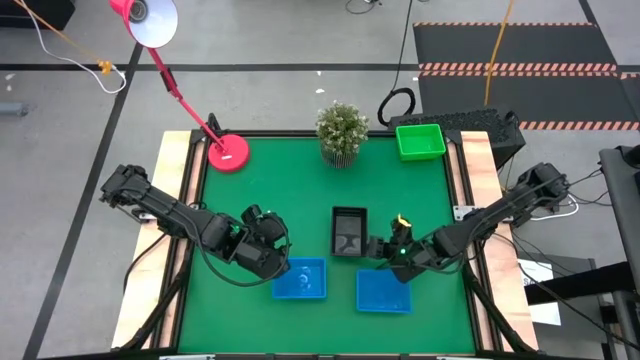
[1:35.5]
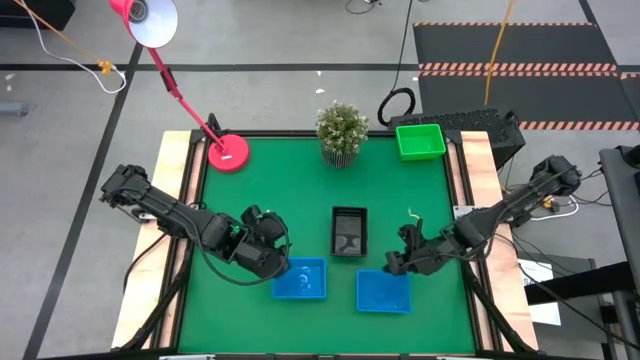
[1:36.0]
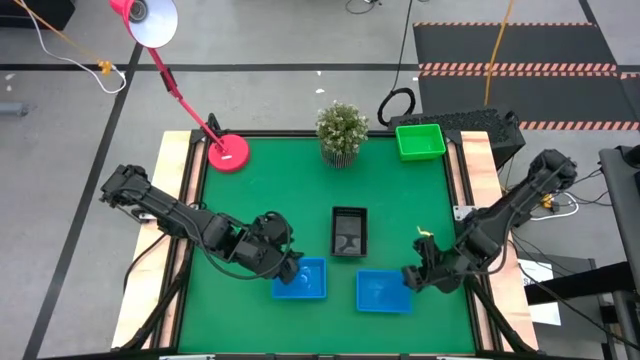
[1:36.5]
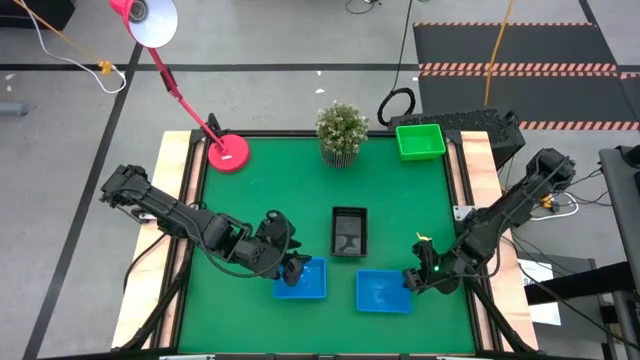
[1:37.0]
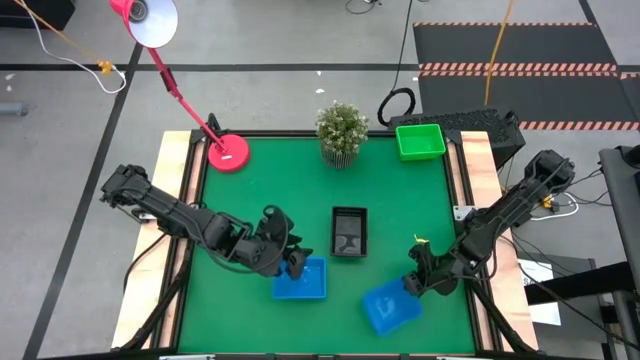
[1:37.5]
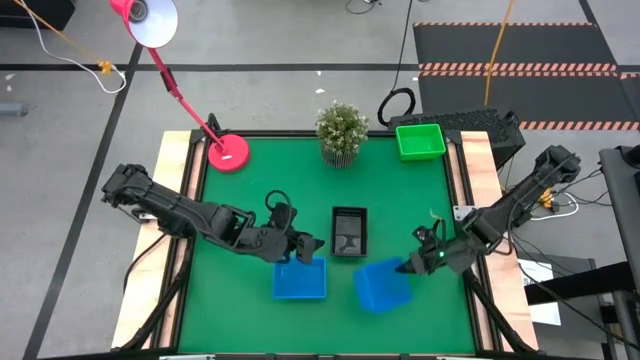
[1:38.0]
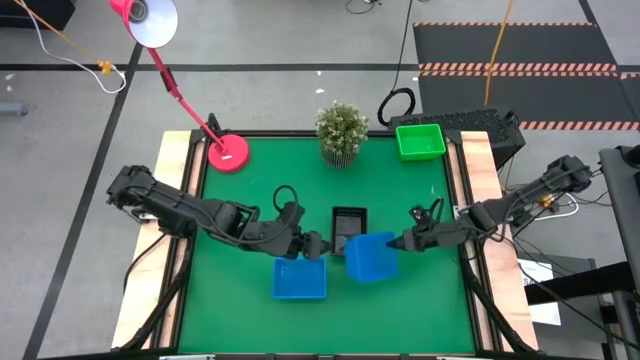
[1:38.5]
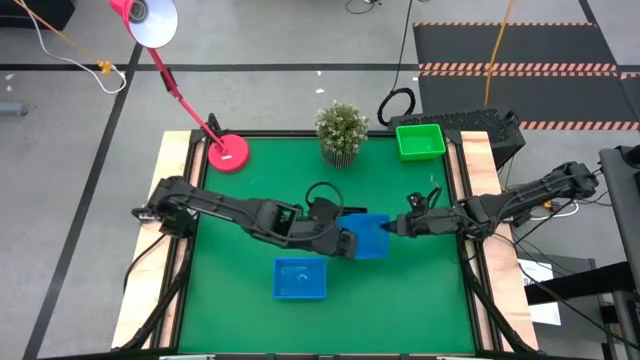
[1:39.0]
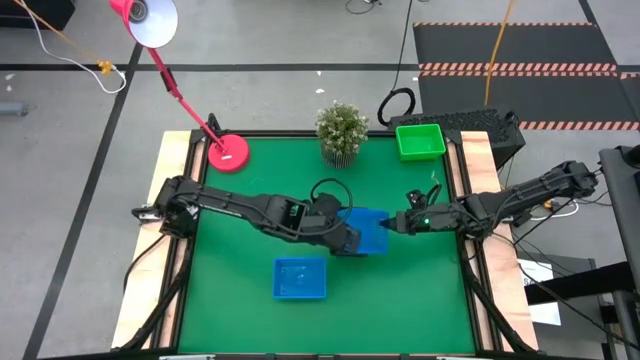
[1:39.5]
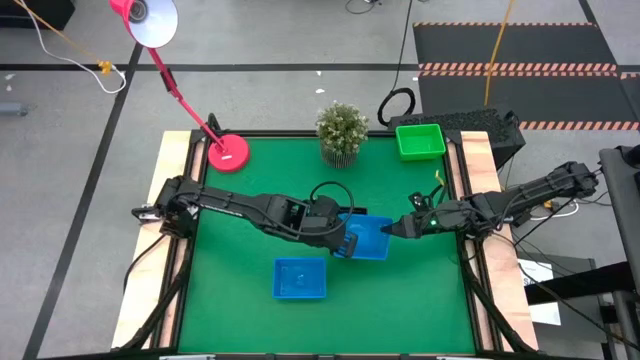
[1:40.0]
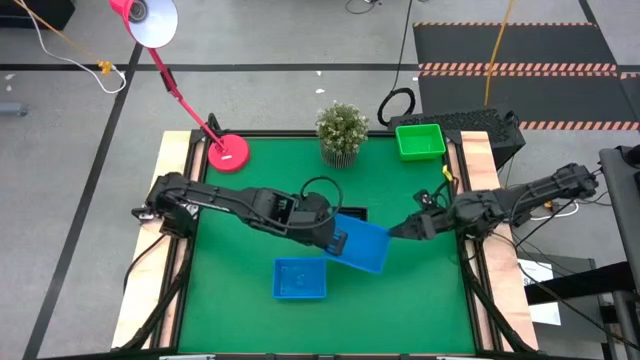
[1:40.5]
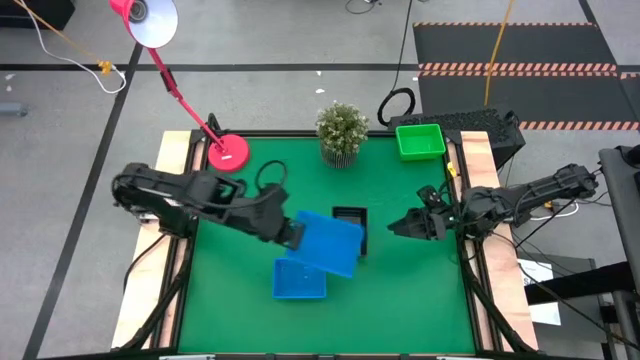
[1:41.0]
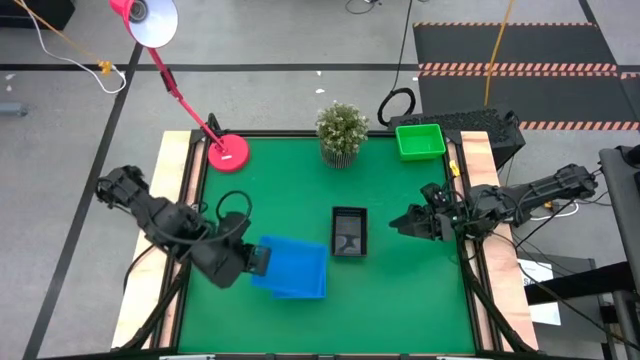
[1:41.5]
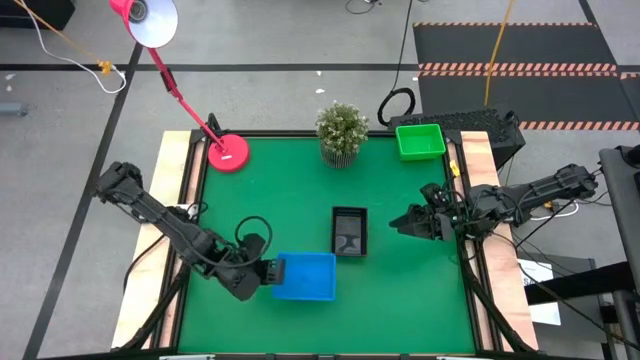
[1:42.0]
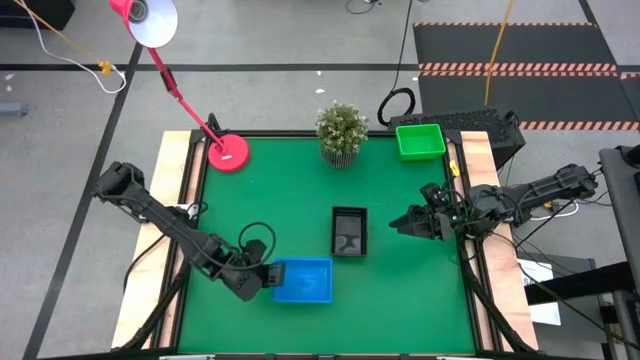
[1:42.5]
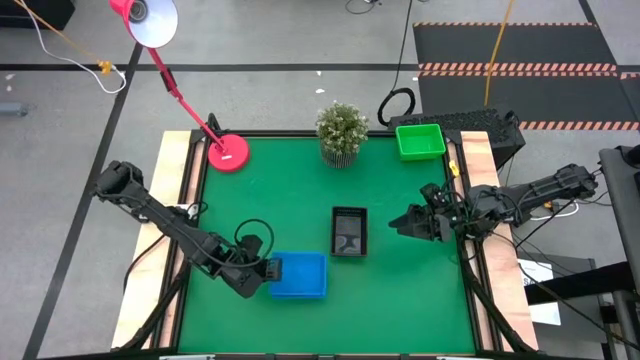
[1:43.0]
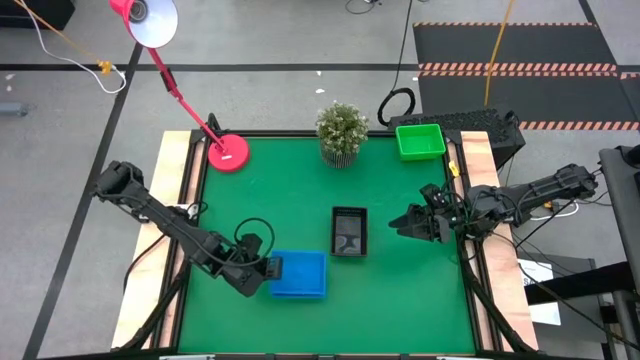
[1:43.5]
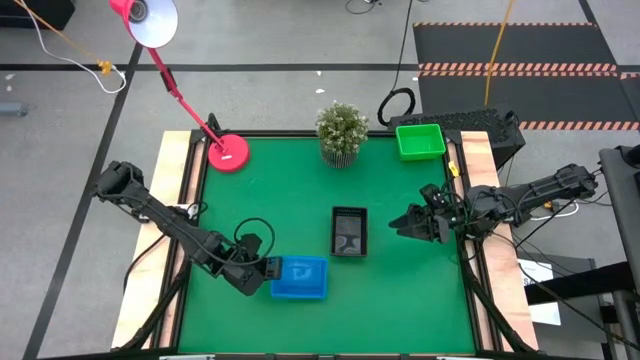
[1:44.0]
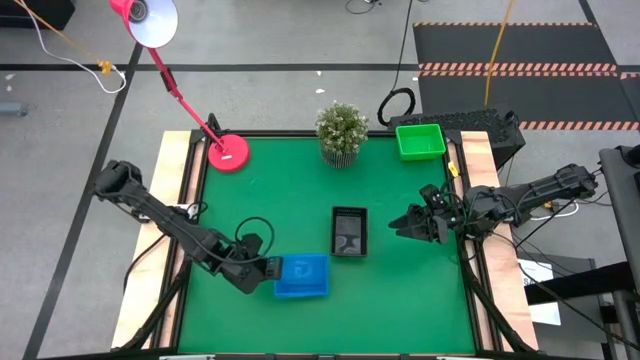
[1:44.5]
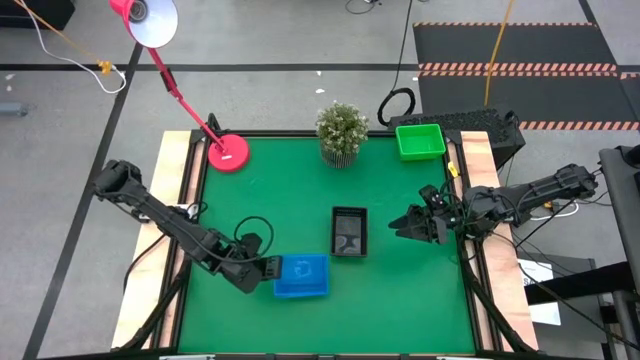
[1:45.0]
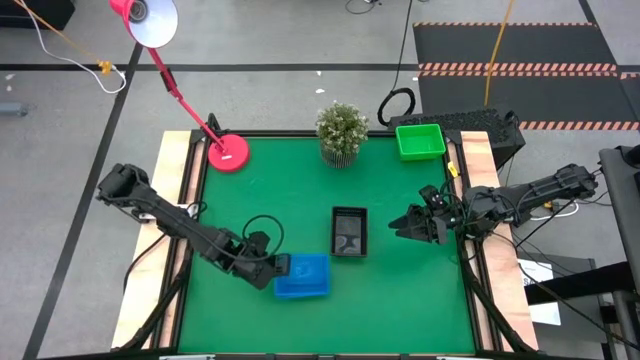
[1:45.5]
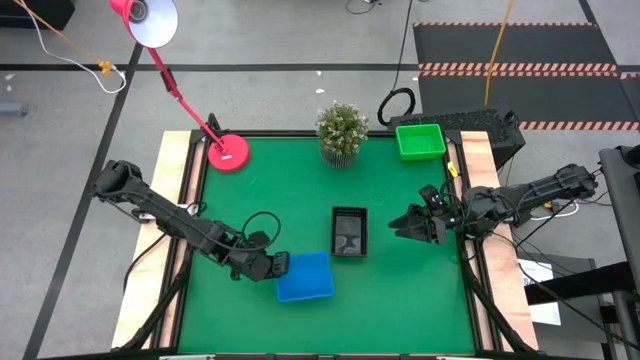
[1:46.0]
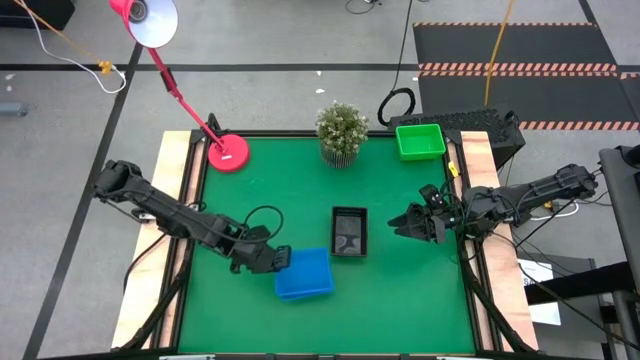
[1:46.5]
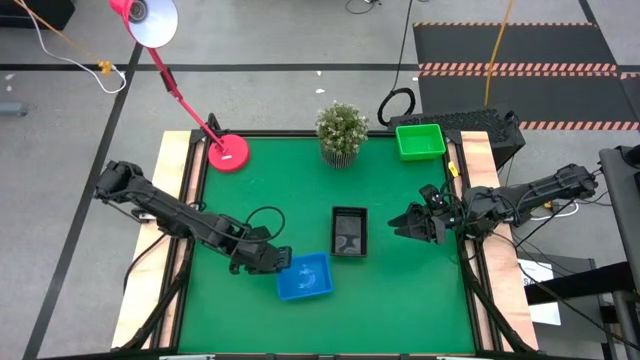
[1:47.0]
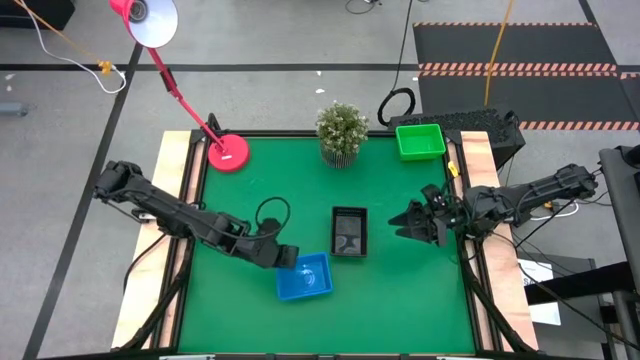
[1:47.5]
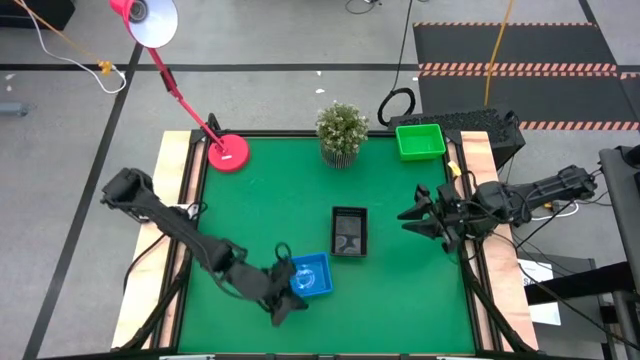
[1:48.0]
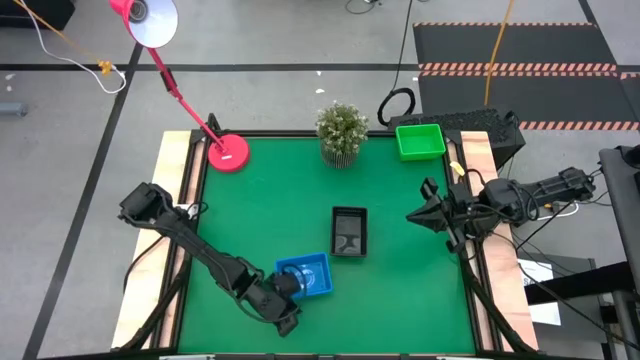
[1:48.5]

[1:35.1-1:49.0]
Stack the right blue bin on the left stacked blue bins

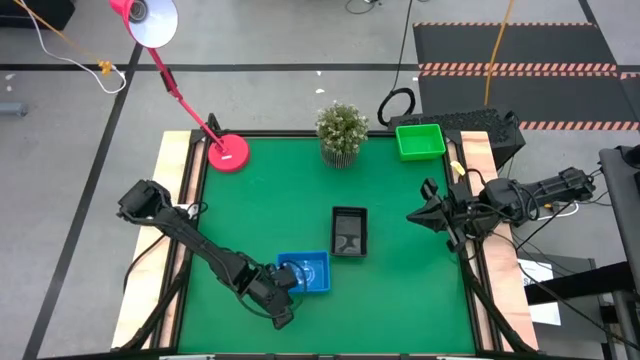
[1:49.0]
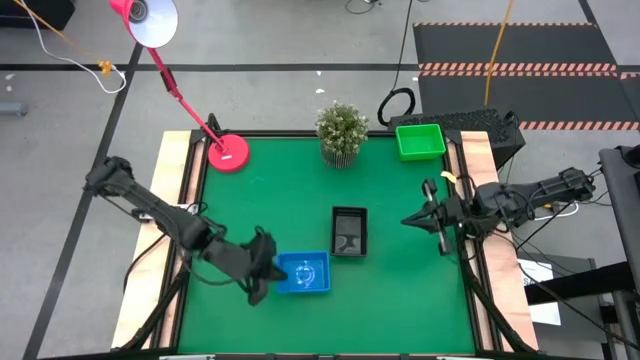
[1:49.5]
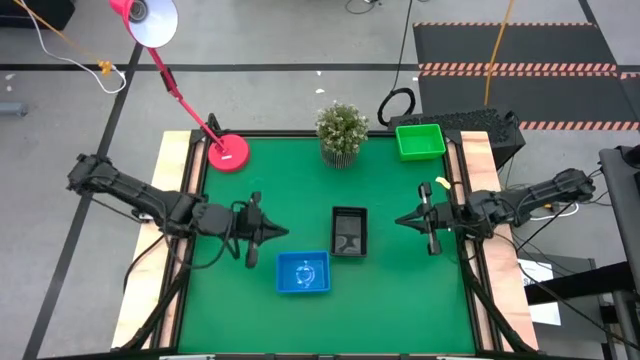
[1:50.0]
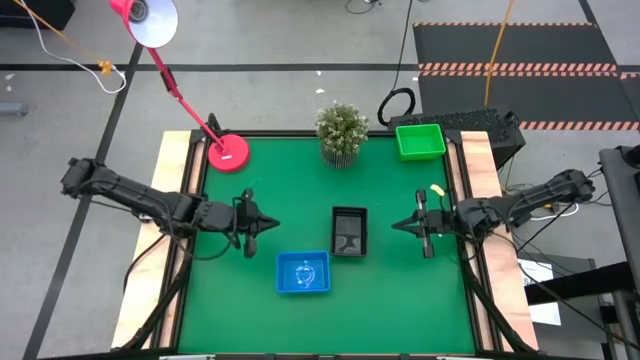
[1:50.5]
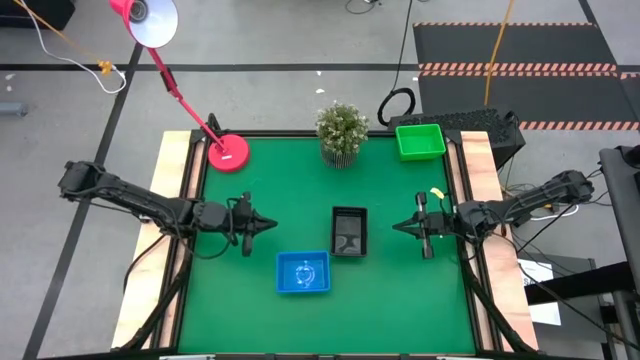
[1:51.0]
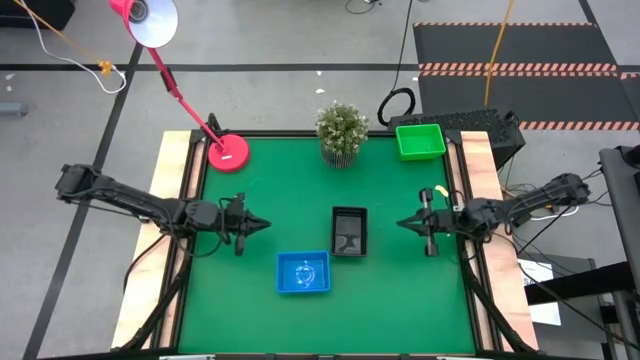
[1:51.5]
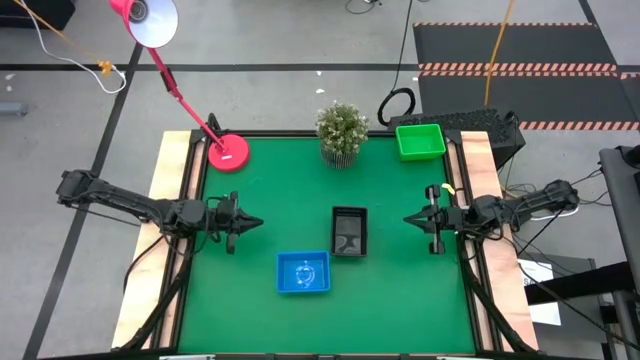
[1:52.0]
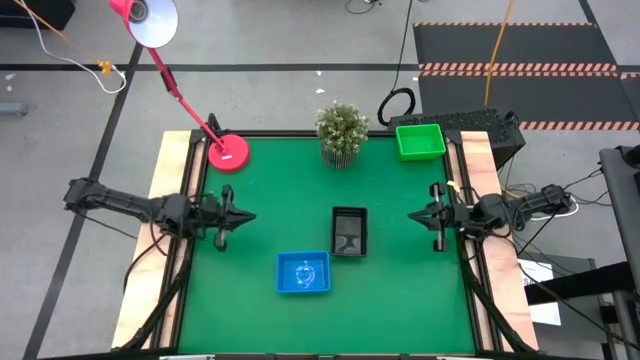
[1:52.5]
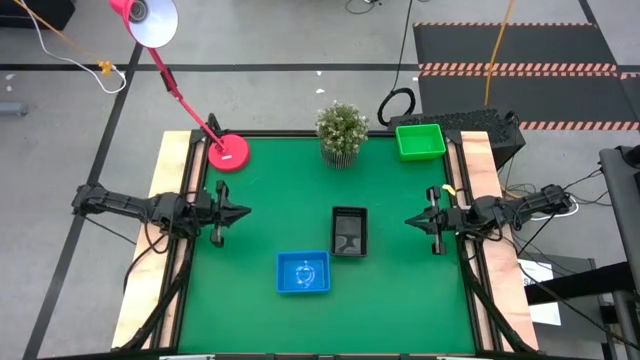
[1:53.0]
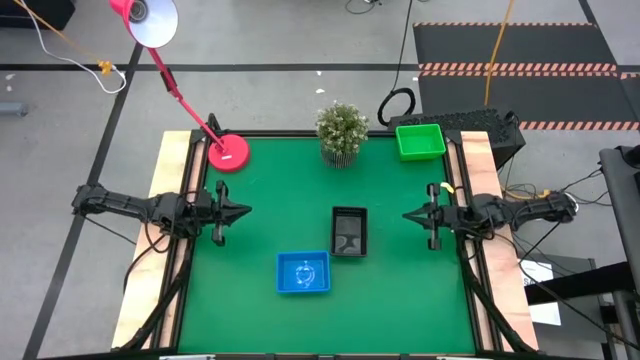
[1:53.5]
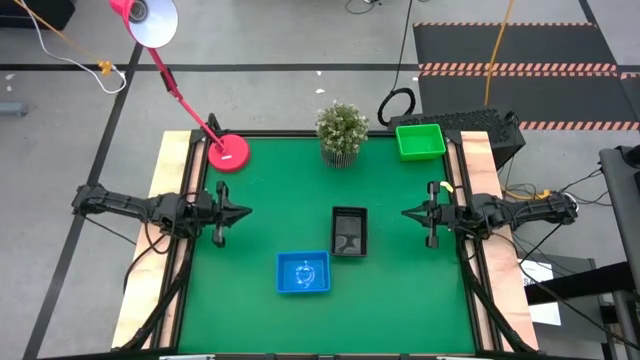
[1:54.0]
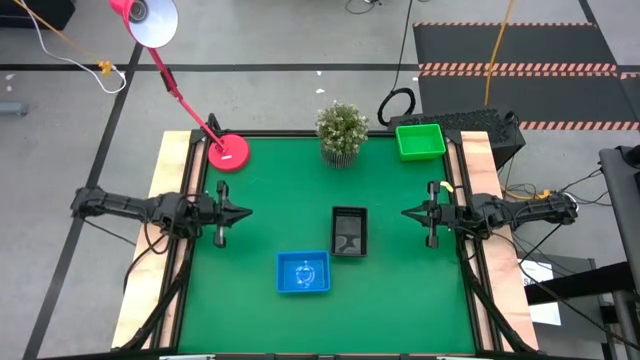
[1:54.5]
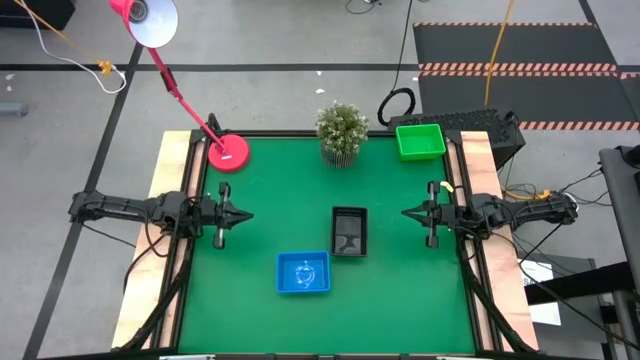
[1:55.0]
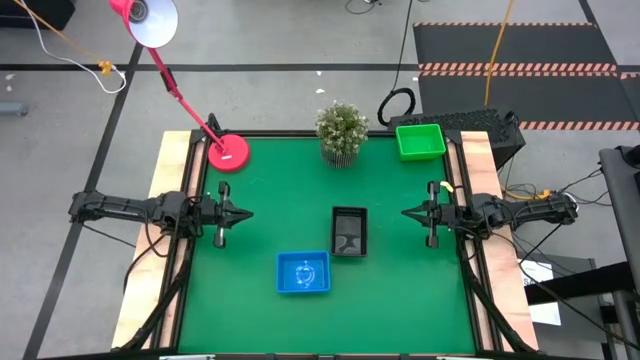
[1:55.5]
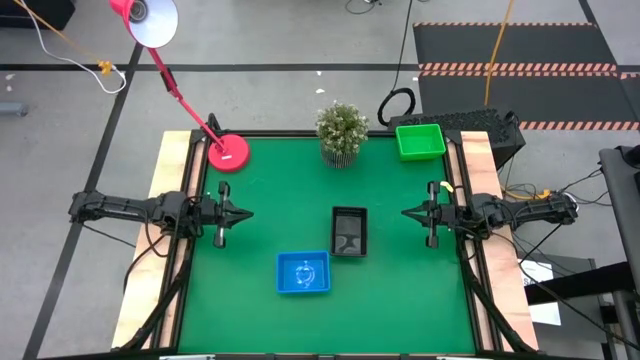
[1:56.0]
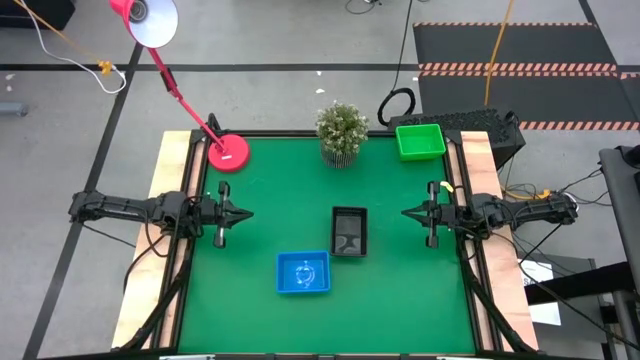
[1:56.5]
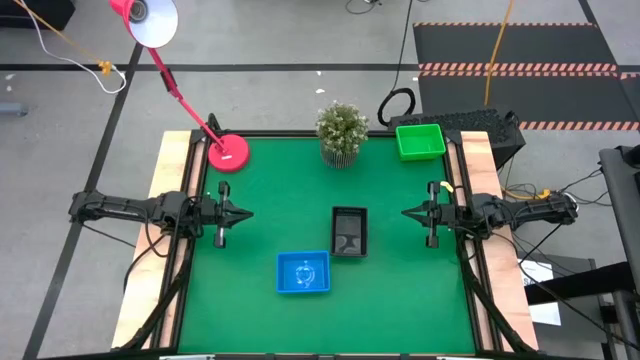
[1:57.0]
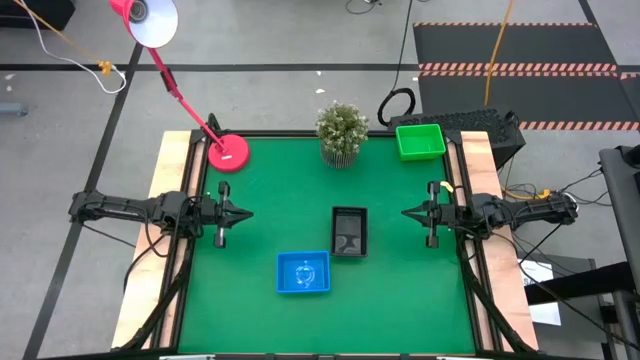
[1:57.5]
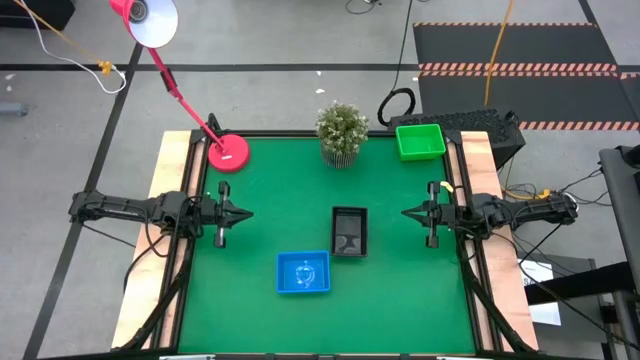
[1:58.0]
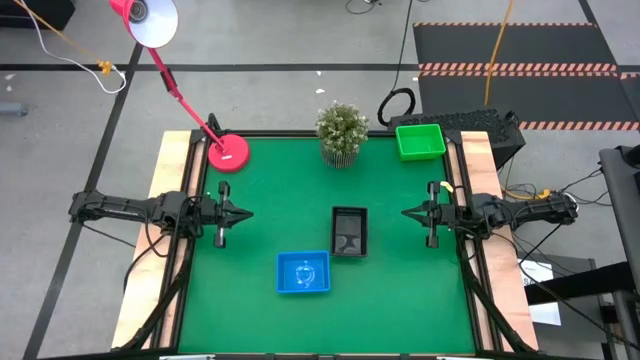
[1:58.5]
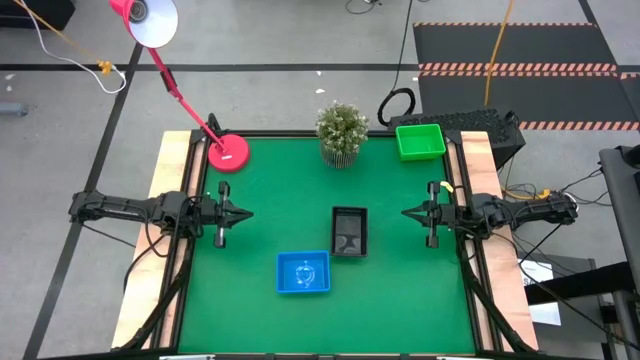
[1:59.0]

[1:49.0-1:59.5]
Return to Home Position
